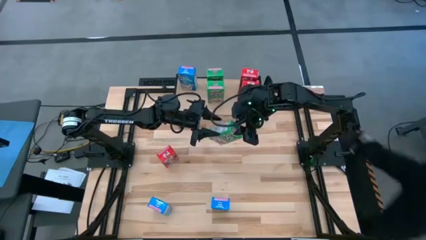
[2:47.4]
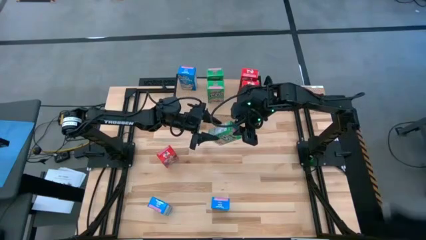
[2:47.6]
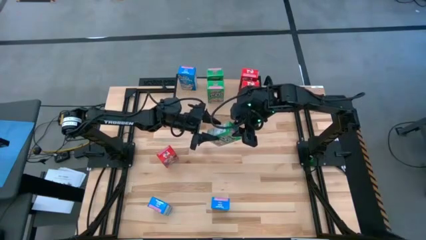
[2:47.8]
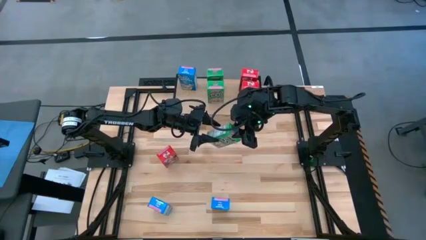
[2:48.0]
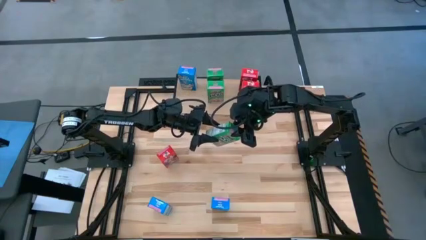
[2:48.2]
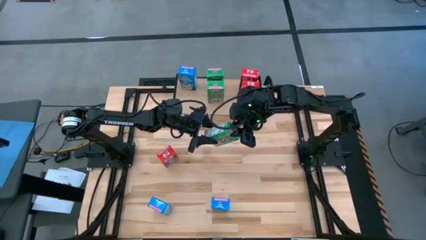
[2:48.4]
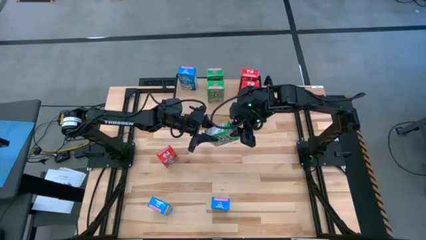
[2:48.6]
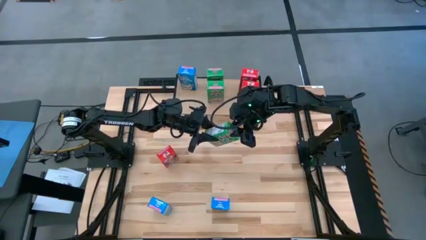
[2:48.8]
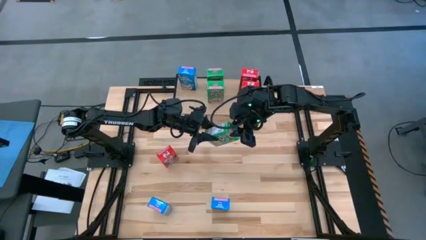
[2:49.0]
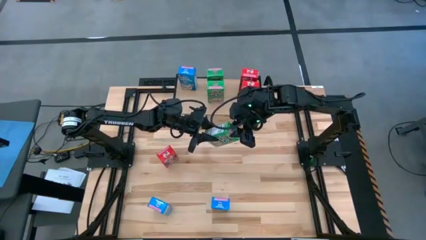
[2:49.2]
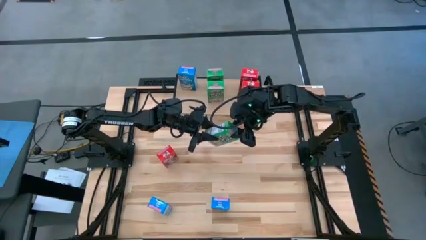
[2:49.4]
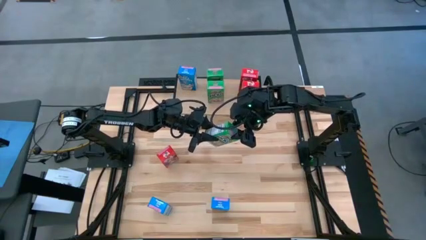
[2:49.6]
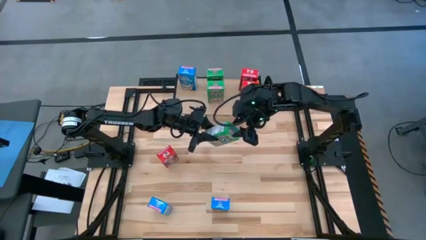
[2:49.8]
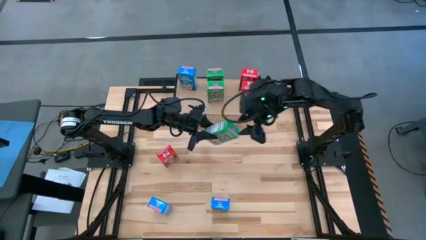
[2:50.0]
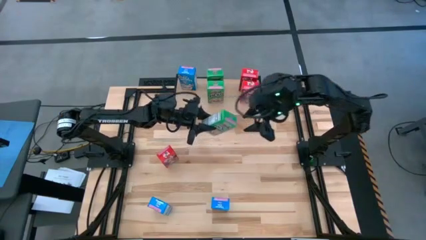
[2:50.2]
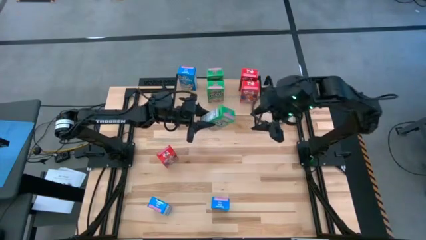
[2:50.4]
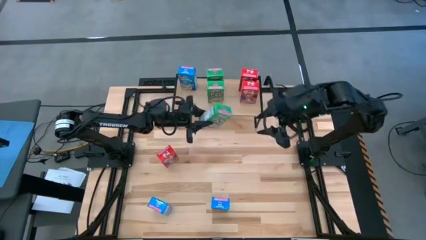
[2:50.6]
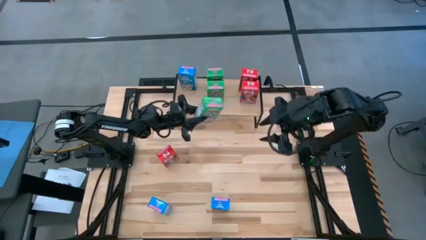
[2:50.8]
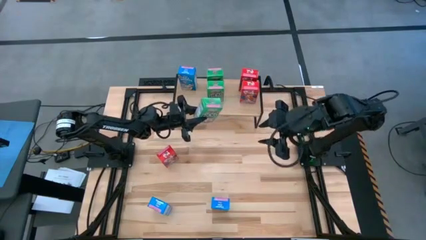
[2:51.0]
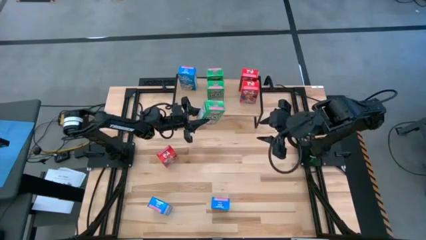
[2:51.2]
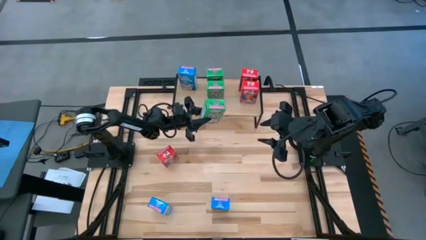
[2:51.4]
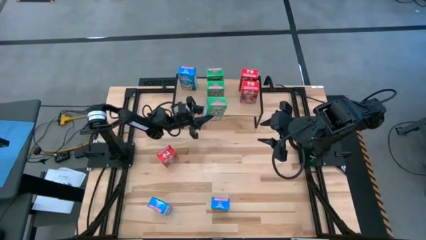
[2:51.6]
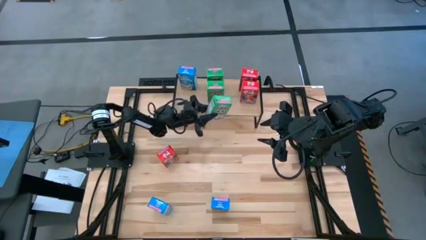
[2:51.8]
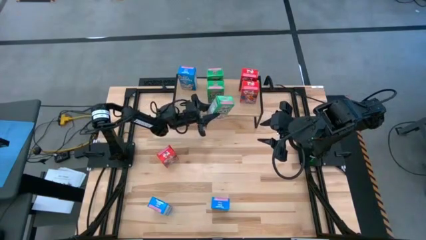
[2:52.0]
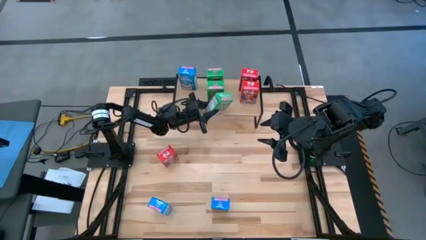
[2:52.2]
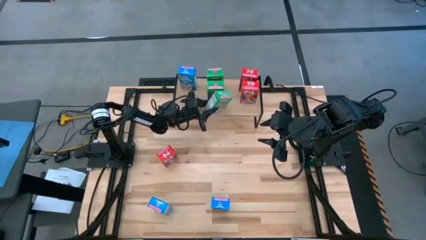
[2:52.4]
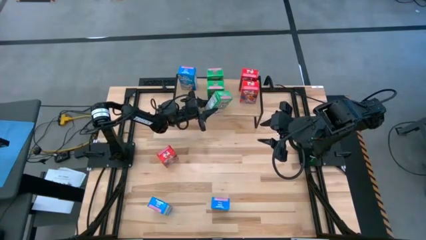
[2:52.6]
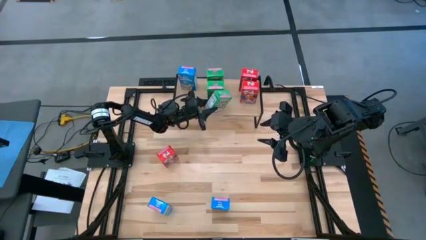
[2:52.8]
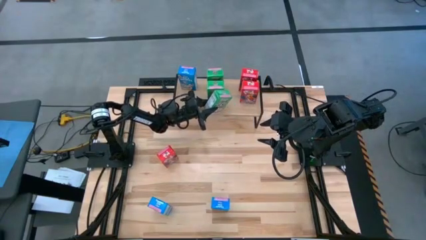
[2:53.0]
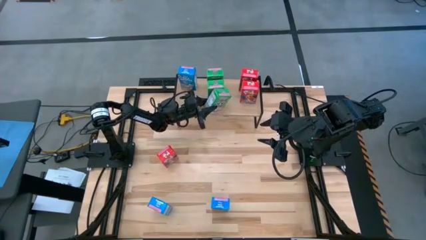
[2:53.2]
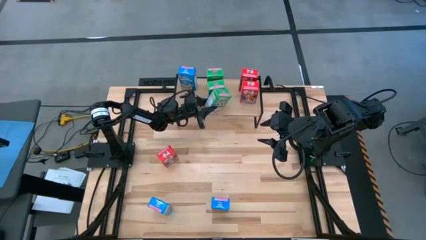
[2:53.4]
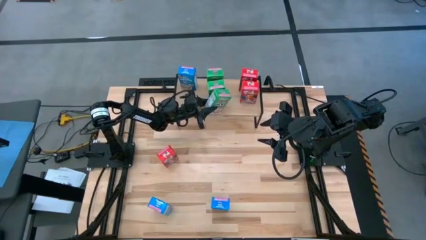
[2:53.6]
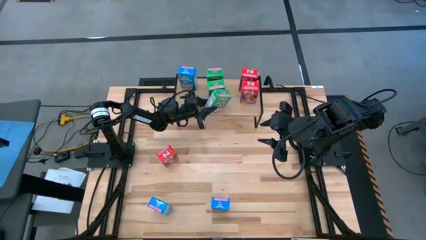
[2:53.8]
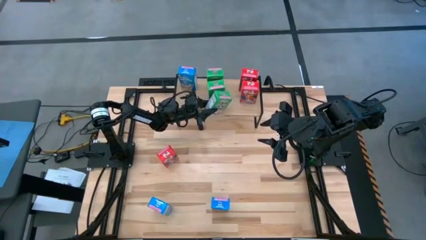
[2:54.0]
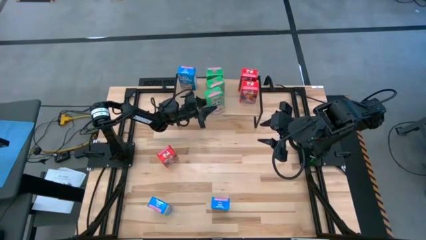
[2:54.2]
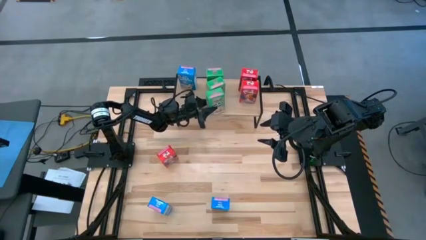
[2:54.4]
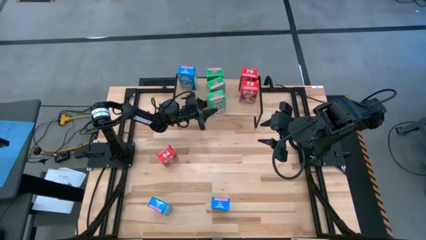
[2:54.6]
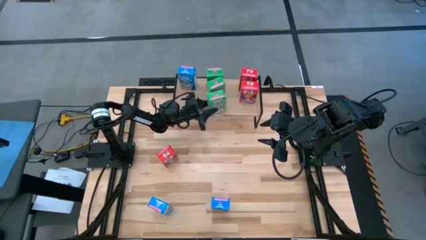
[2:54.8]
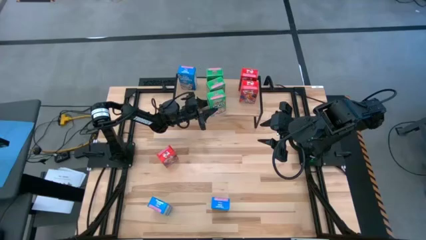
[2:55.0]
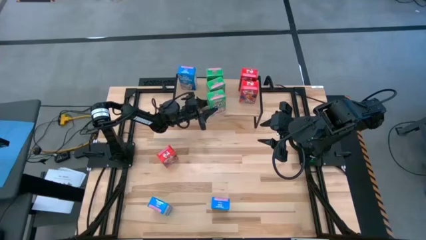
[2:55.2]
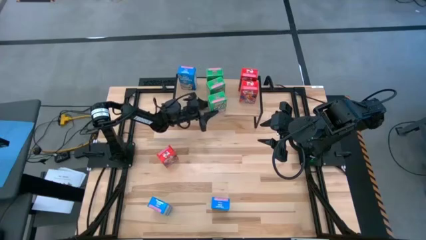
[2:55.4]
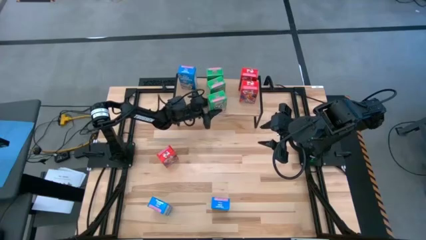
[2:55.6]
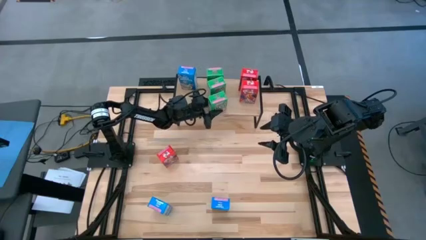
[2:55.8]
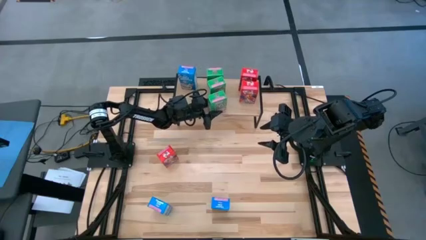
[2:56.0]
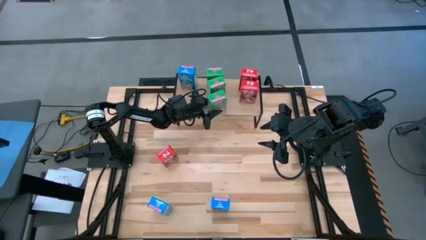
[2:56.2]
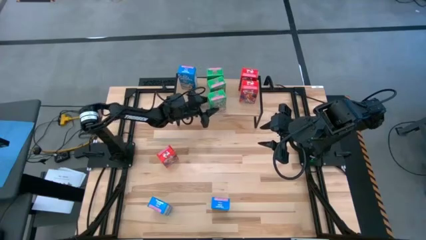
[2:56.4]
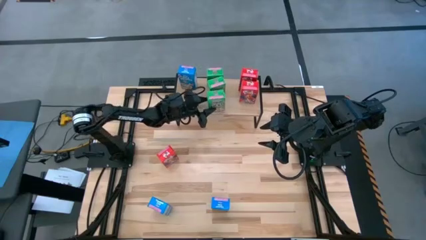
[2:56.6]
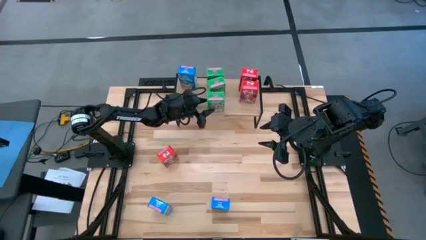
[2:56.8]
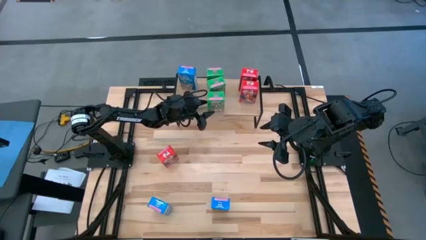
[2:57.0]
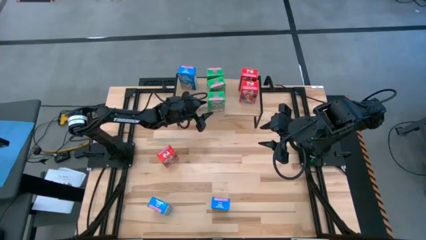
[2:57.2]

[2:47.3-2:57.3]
Task: Stack cereal on shelf
Put the green cereal box on the shelf aligned with the green cereal boxes

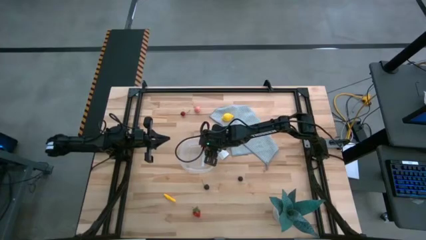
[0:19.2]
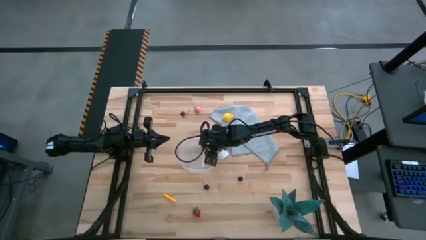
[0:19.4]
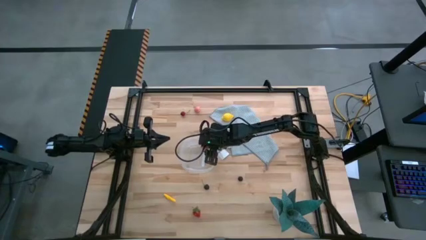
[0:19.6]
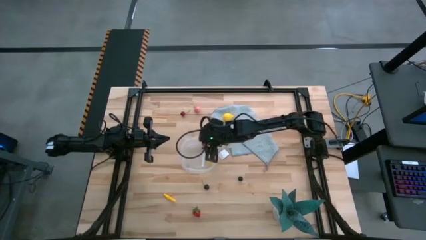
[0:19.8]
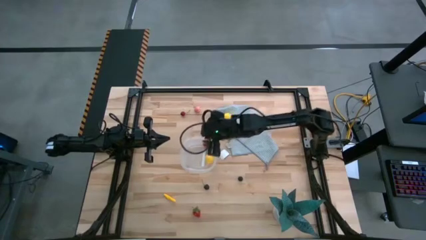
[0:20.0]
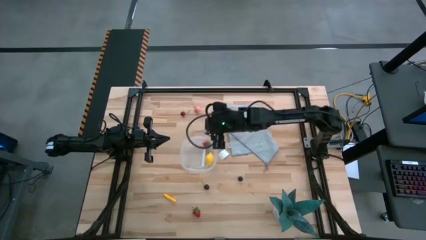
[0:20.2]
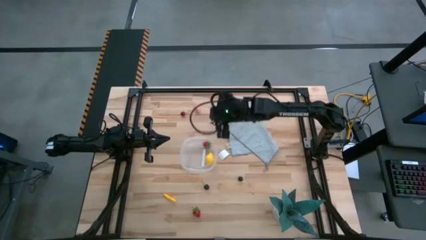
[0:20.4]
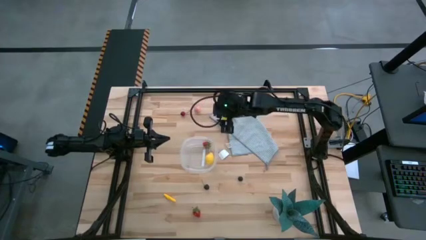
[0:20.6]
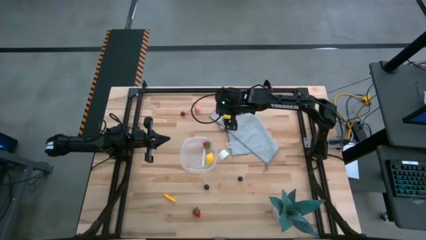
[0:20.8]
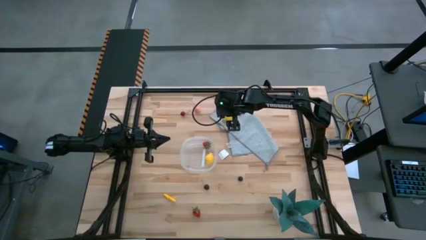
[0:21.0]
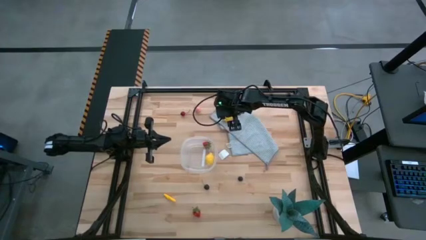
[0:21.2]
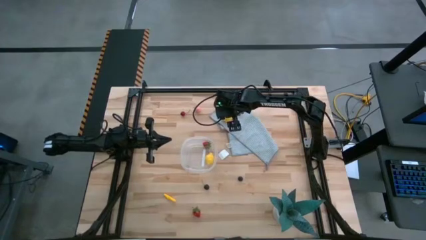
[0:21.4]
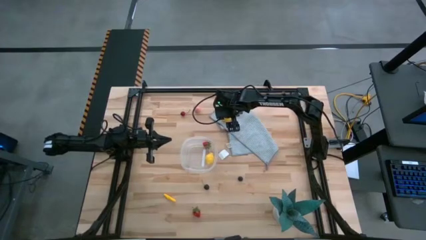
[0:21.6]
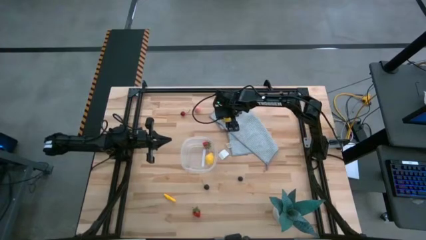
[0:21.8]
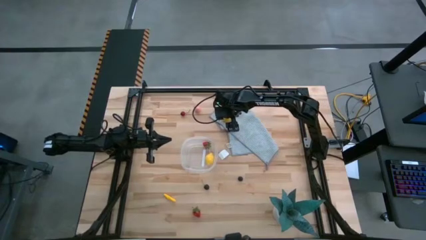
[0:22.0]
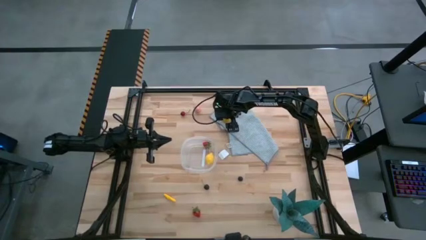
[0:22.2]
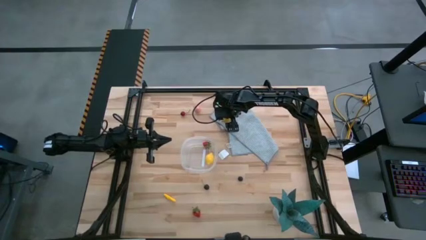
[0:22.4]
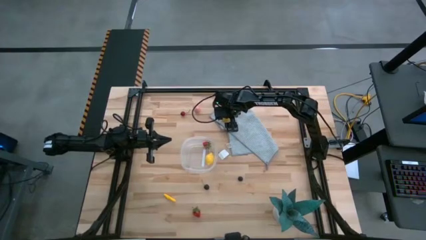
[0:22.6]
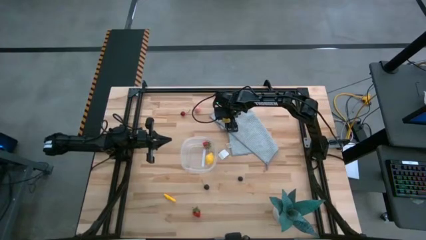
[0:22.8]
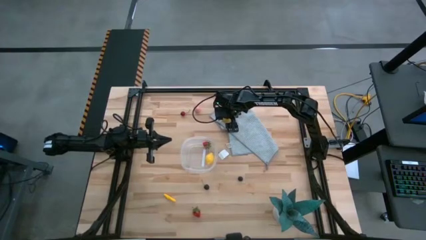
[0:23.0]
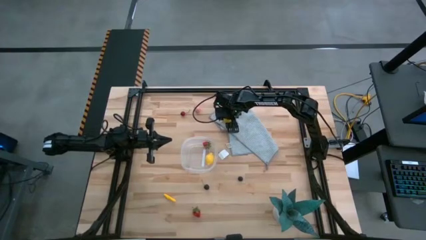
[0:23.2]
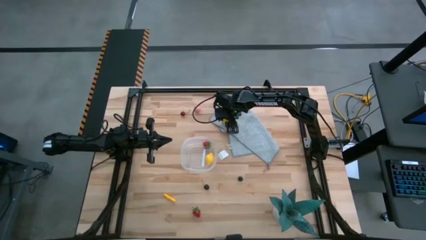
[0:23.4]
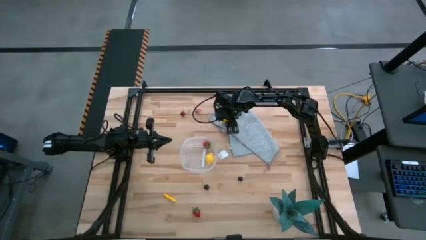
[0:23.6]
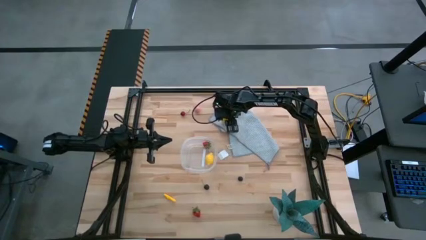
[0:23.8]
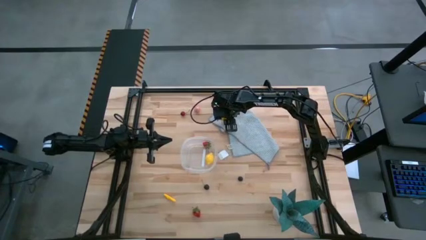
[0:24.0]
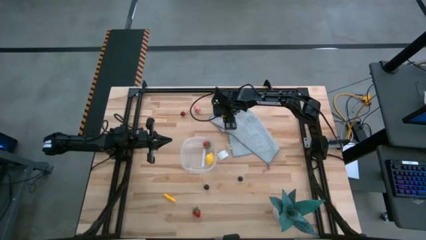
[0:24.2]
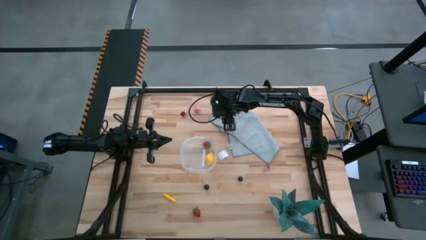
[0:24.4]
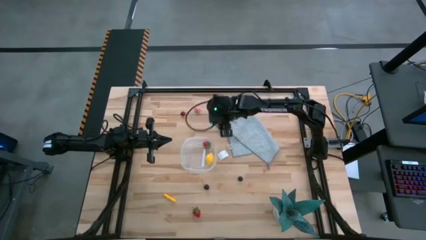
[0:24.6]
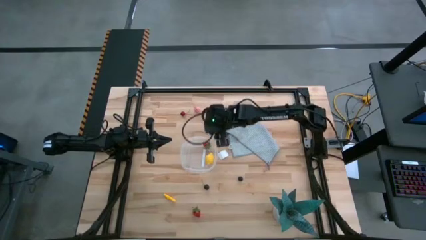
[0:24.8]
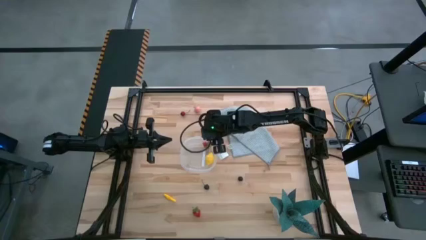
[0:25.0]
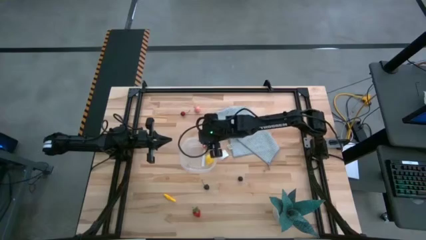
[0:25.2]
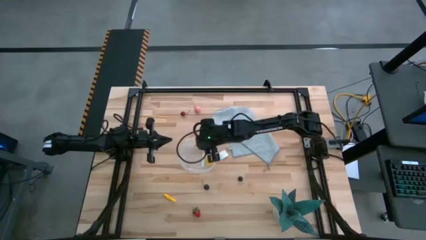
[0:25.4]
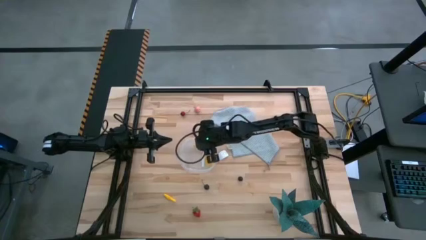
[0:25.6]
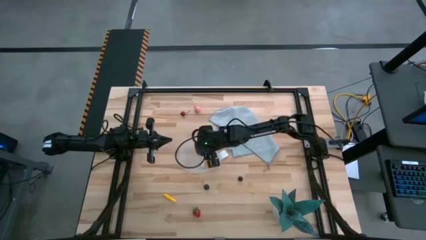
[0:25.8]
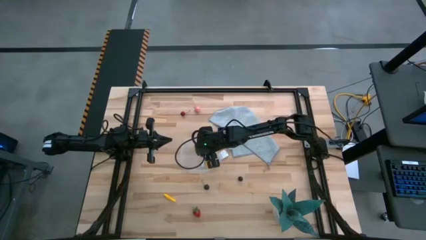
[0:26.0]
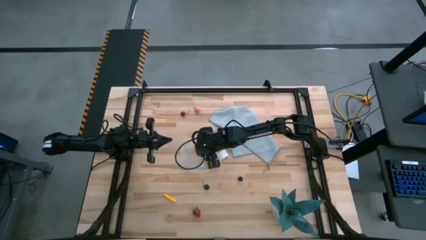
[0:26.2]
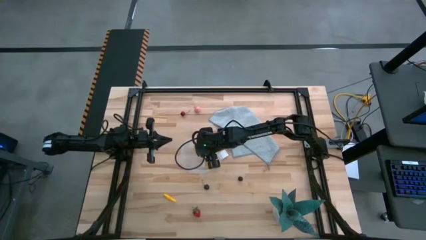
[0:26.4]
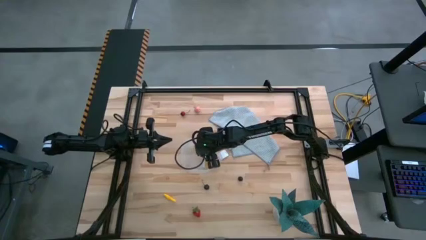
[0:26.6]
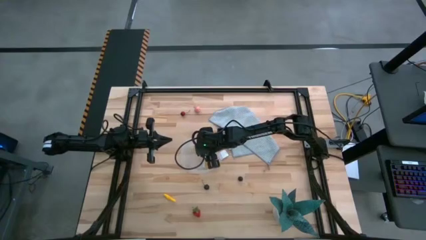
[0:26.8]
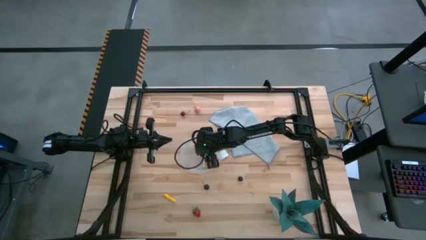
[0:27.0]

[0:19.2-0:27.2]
Task: Pick and placing Produce into tupperware
Put the yellow lemon into the transparent bin
